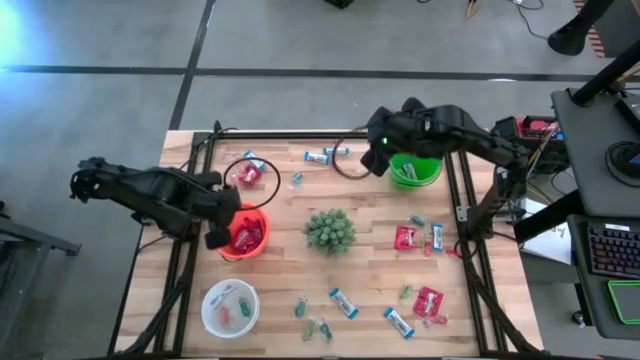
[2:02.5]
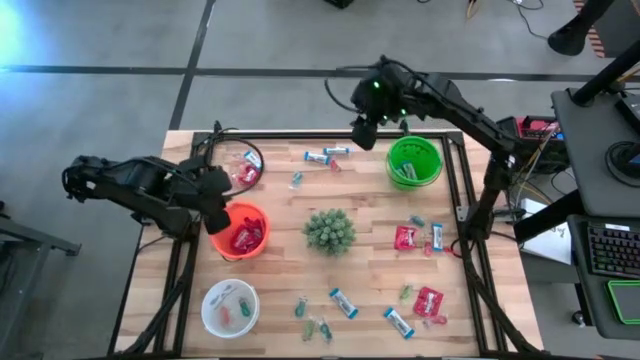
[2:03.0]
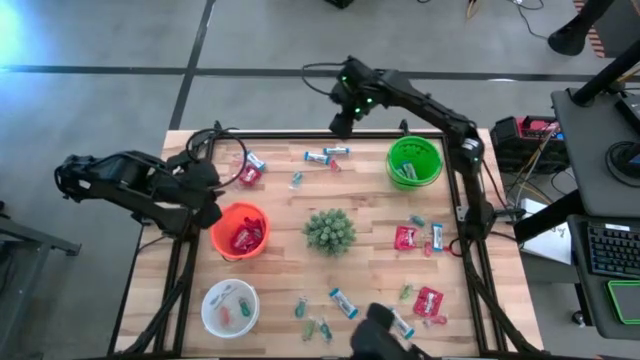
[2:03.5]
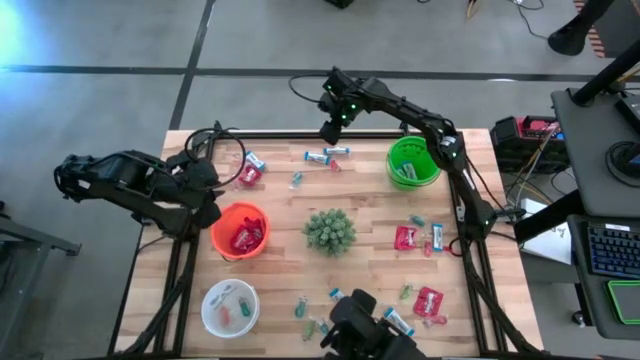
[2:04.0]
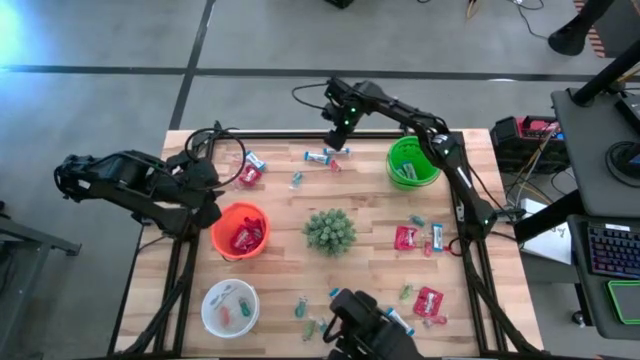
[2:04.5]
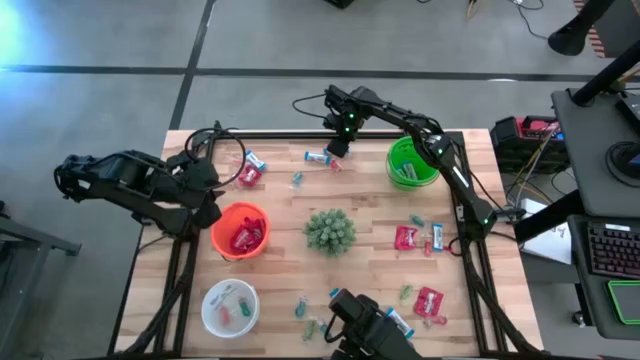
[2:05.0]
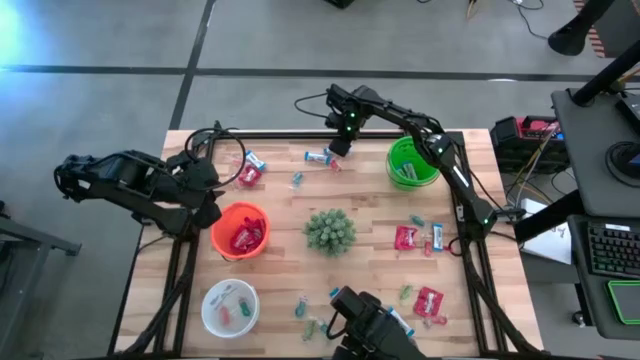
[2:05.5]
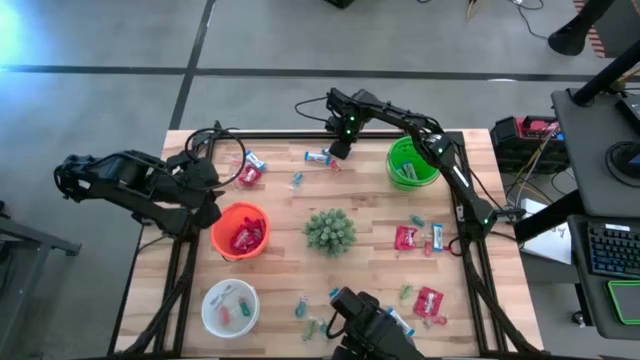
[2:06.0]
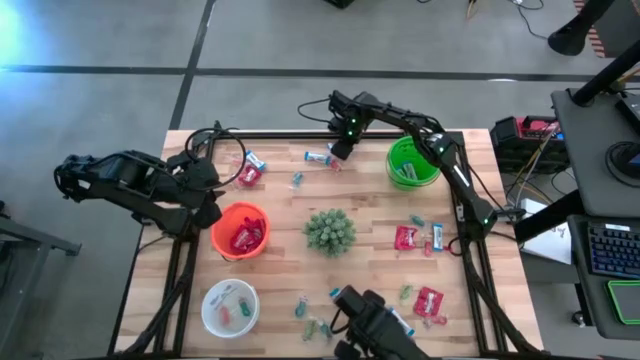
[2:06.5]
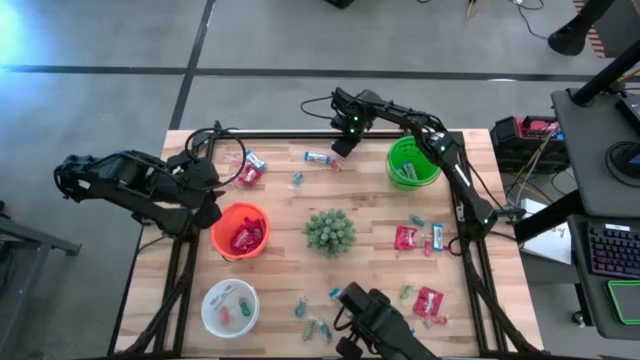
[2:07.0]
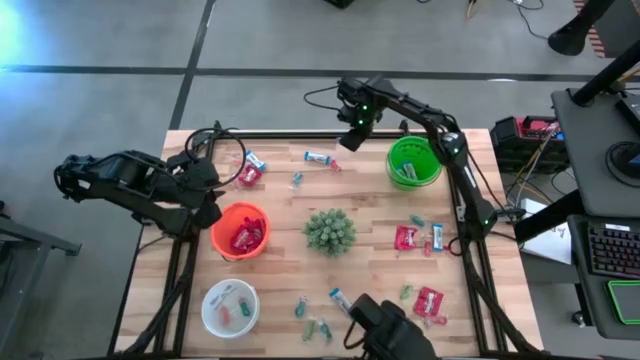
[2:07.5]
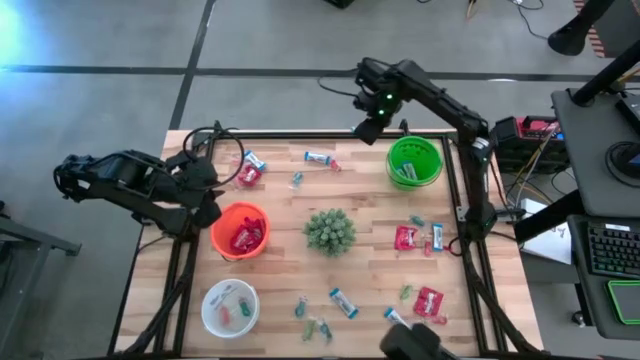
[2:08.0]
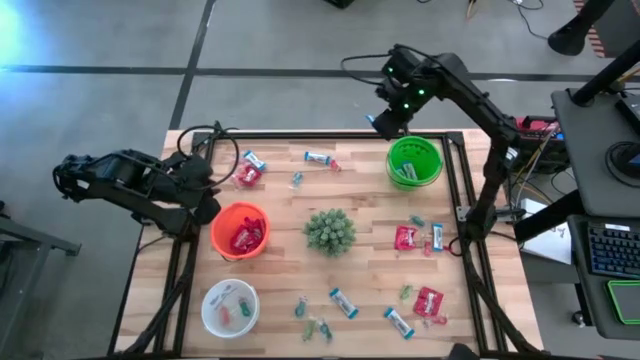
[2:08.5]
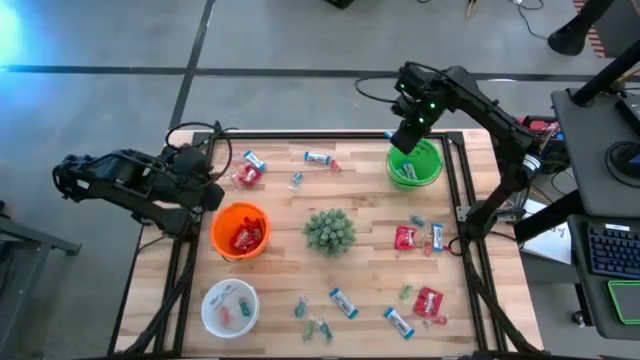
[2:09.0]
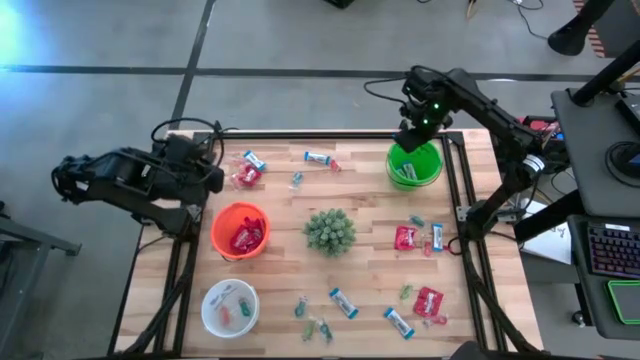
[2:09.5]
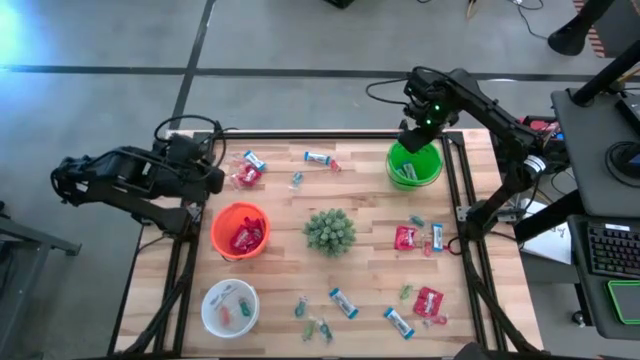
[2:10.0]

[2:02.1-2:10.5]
Task: Sort candy
Put the white chocolate into the green bucket

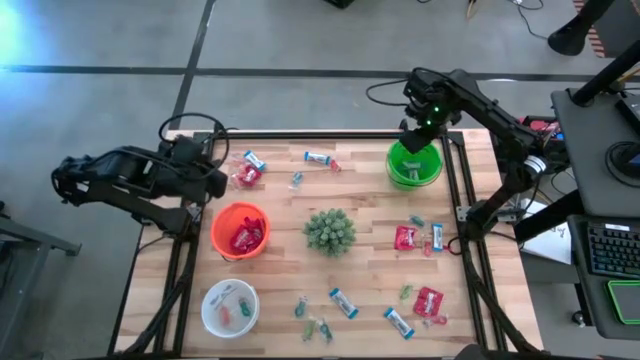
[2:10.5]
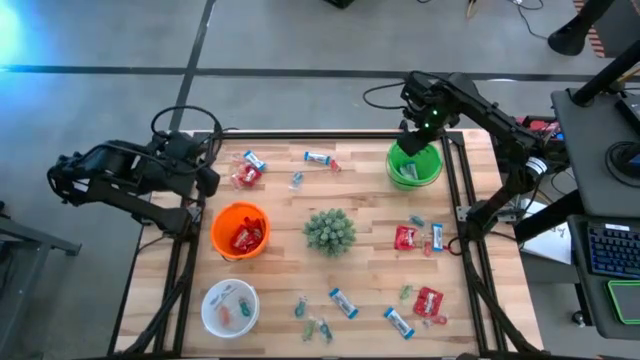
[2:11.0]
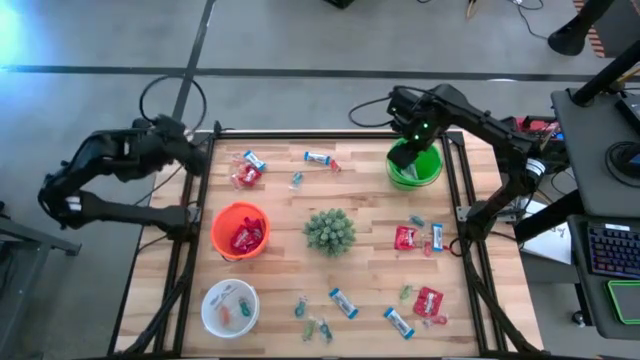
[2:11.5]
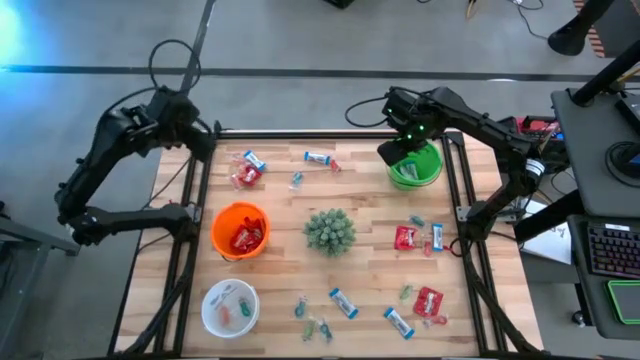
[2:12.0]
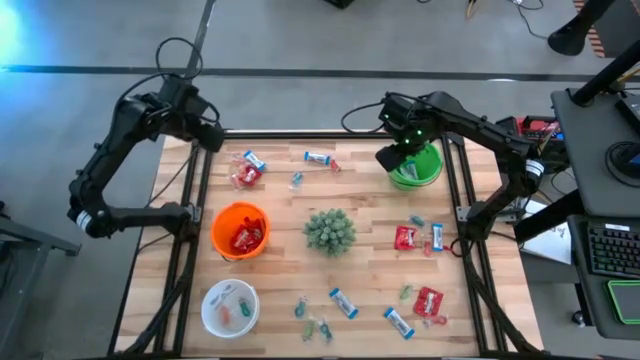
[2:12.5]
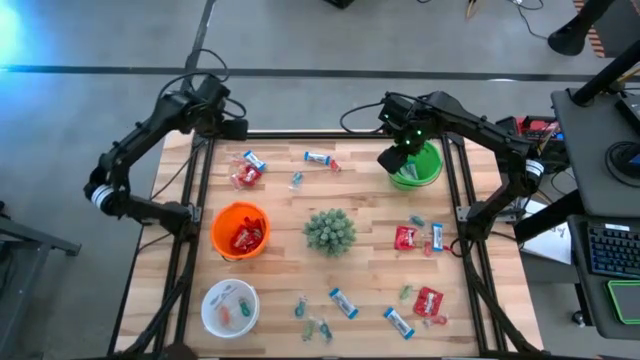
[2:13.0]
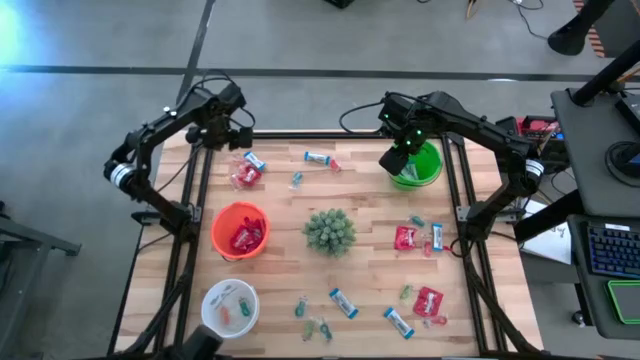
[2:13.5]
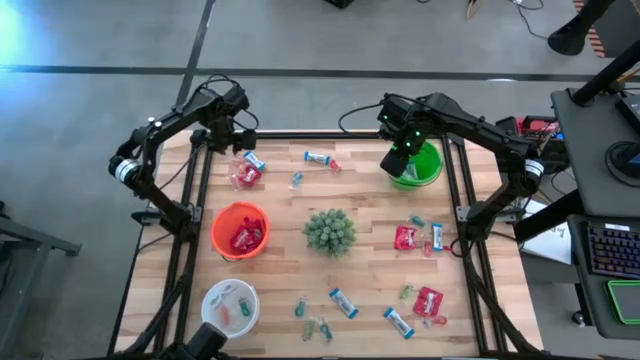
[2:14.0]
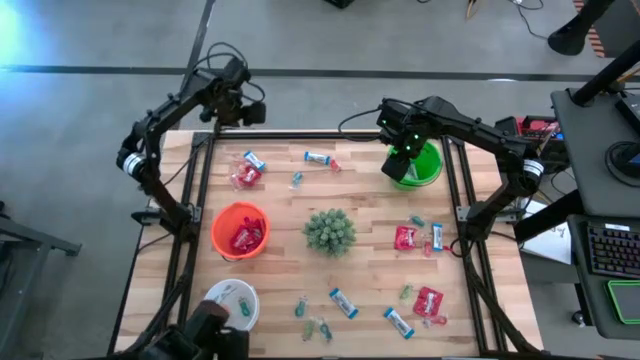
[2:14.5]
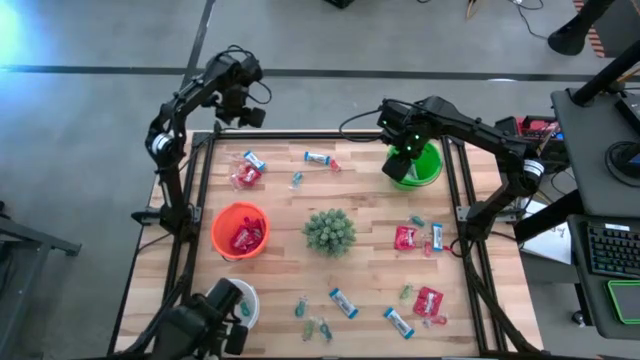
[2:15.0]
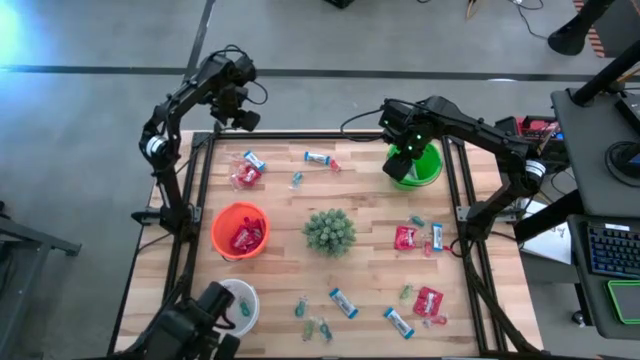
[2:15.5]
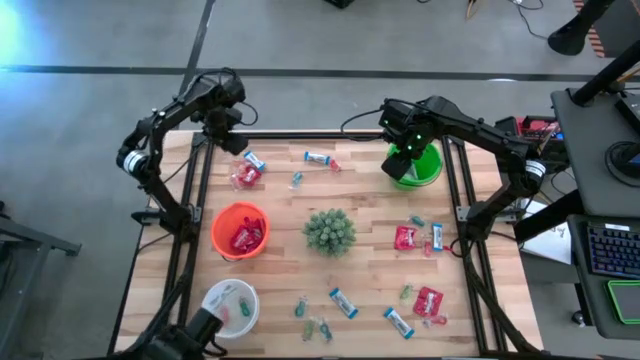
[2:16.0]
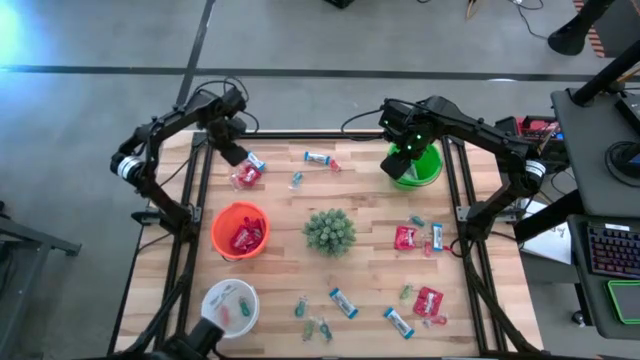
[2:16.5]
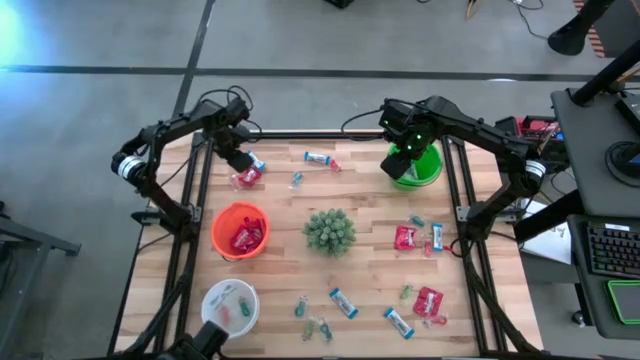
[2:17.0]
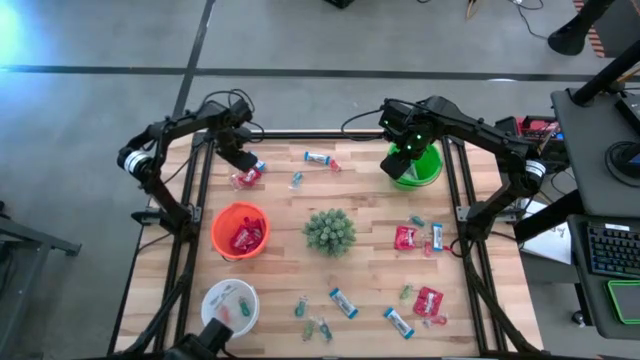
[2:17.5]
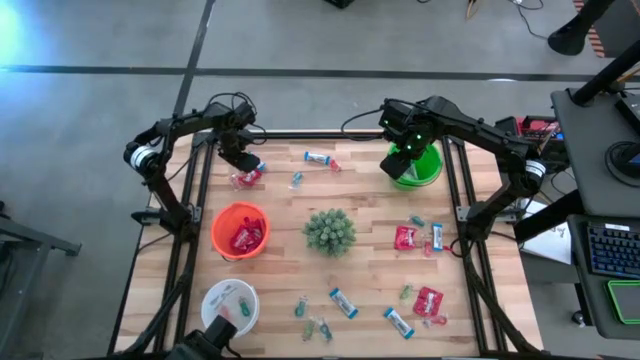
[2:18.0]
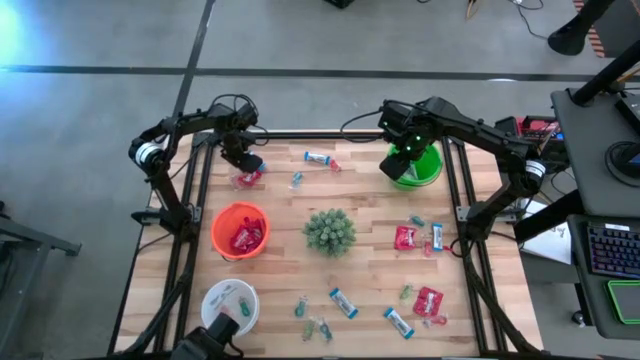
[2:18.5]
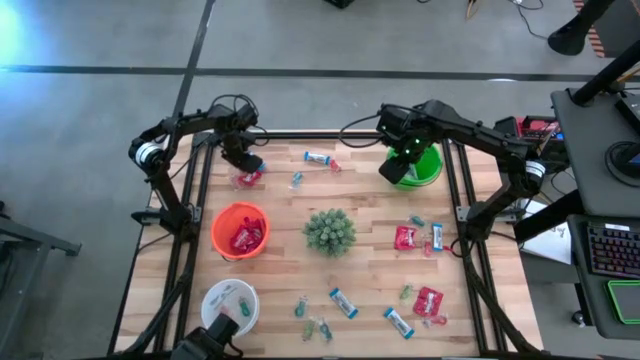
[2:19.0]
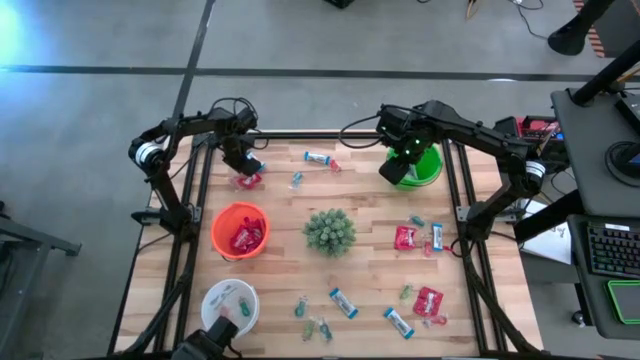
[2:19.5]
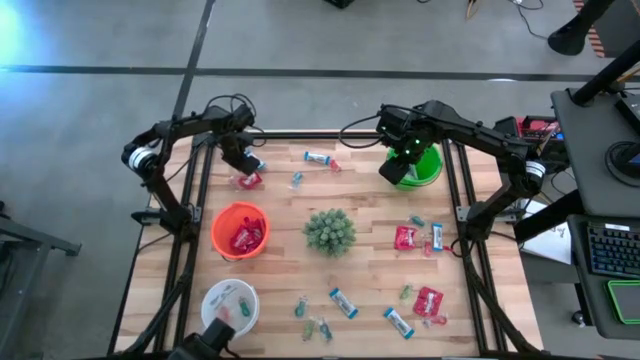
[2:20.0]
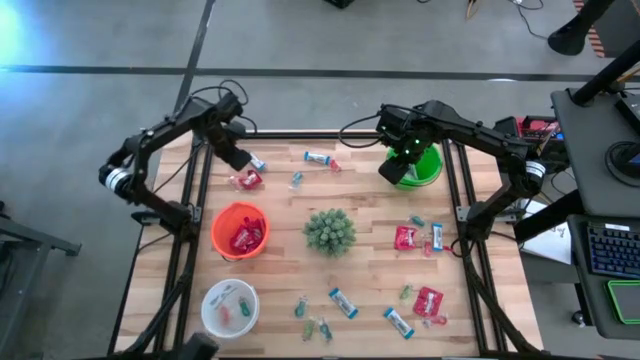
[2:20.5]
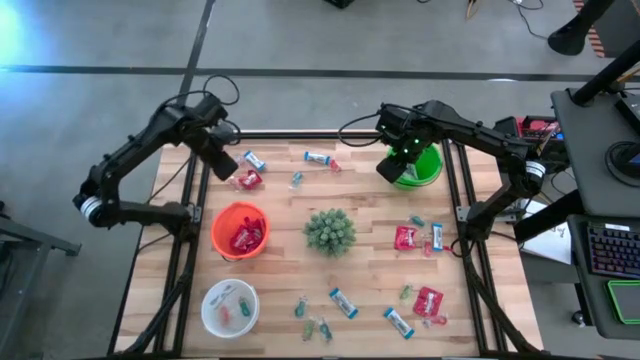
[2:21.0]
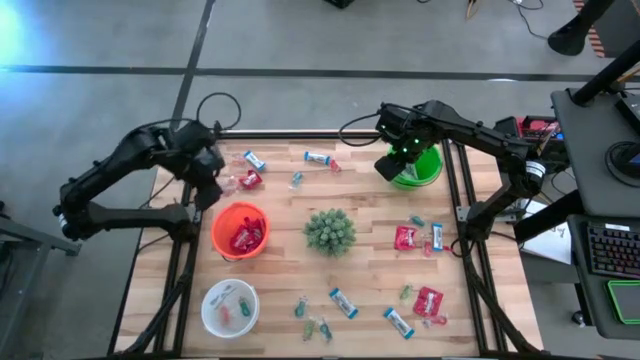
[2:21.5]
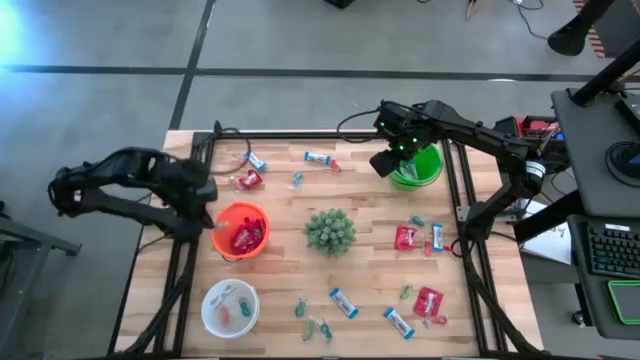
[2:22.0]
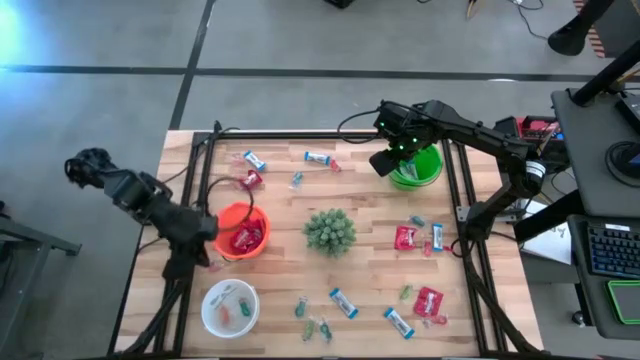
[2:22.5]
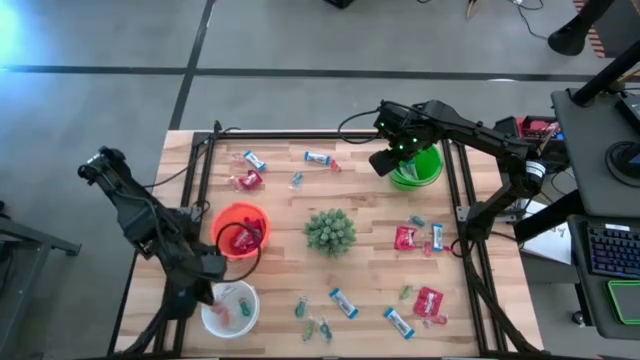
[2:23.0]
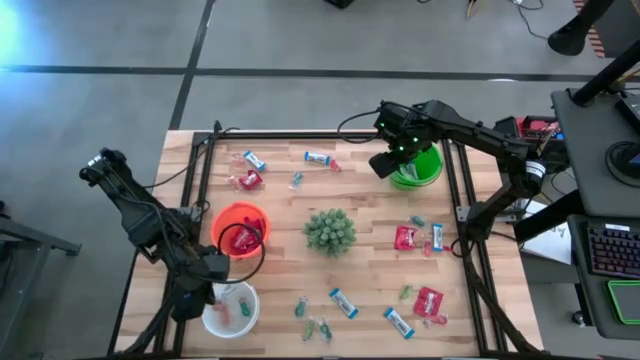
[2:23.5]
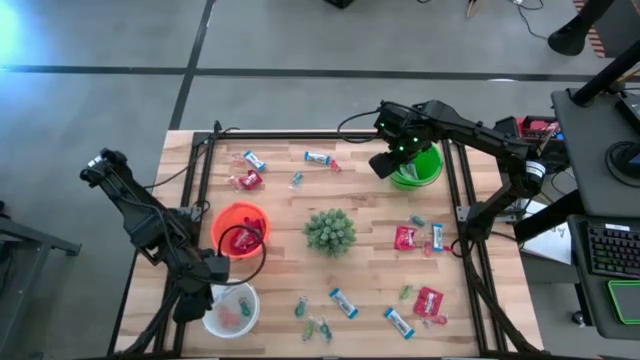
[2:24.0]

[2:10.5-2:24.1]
Put the orange gummy into the white bucket
